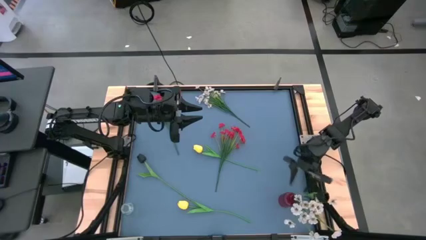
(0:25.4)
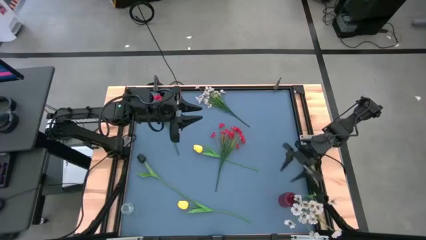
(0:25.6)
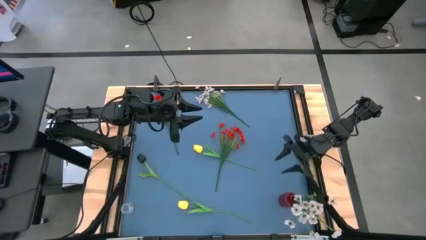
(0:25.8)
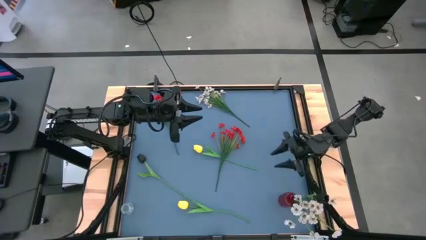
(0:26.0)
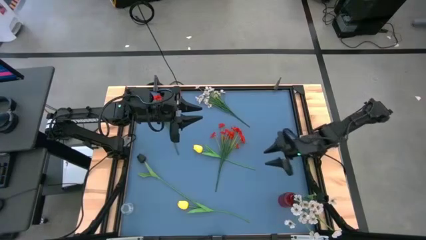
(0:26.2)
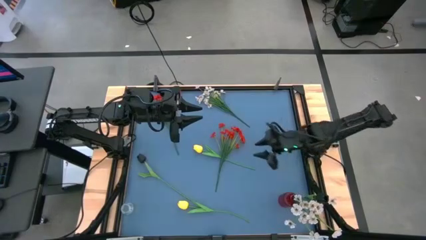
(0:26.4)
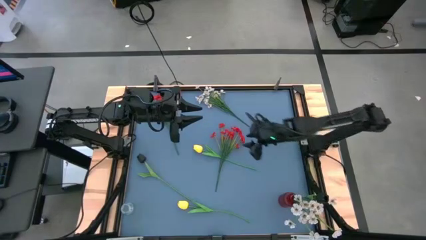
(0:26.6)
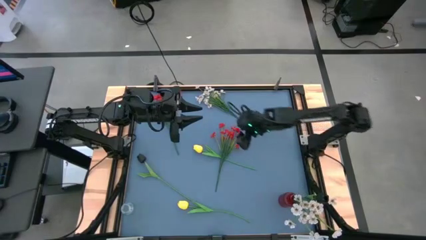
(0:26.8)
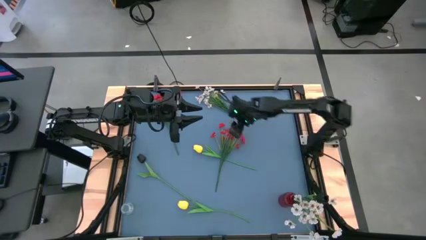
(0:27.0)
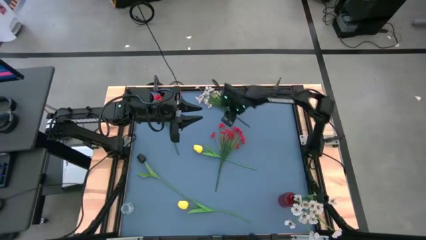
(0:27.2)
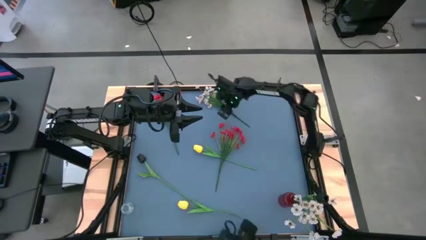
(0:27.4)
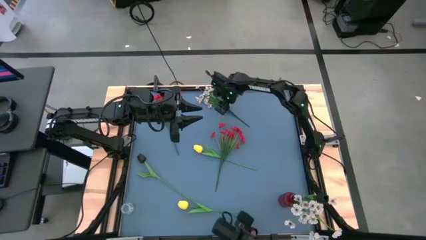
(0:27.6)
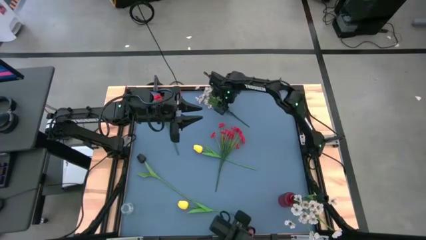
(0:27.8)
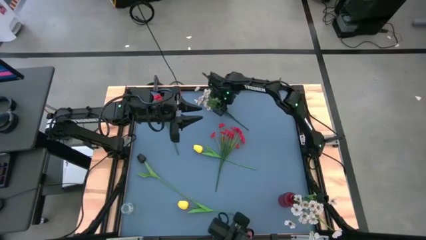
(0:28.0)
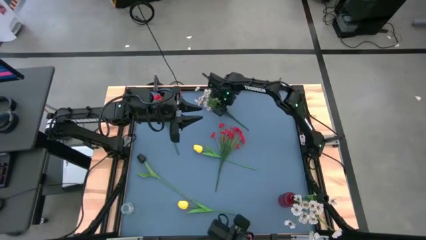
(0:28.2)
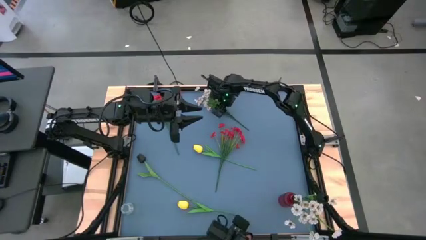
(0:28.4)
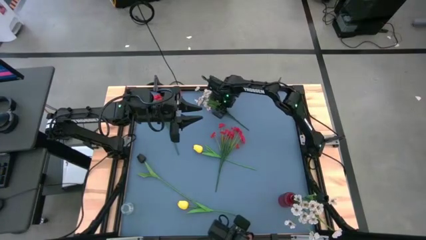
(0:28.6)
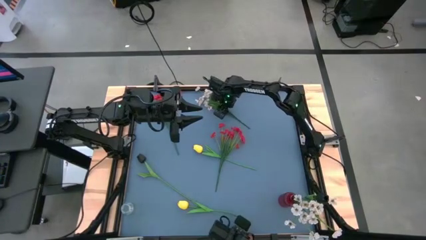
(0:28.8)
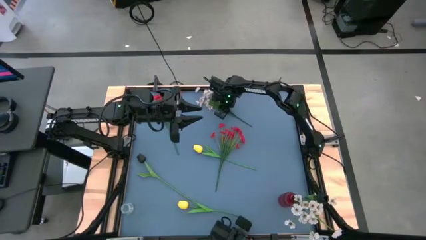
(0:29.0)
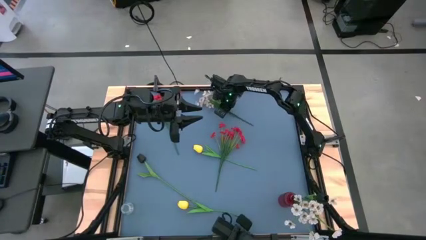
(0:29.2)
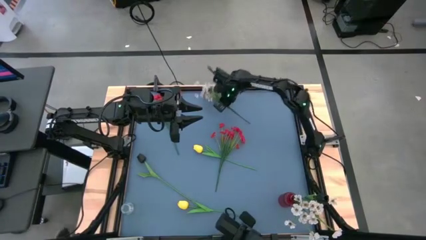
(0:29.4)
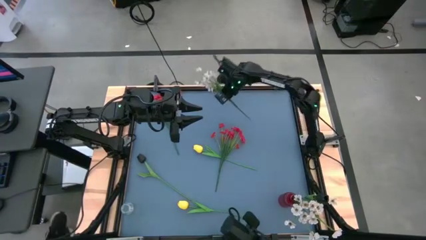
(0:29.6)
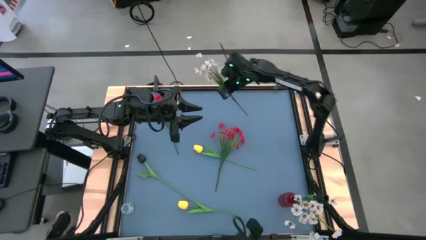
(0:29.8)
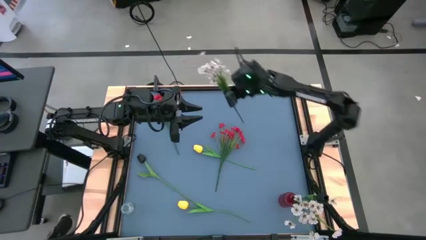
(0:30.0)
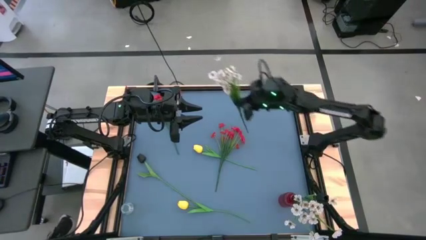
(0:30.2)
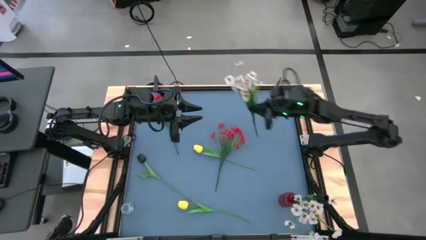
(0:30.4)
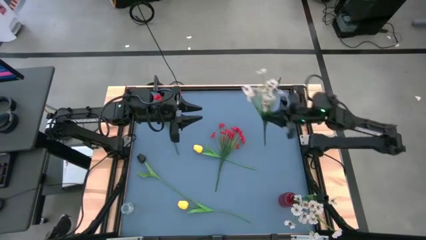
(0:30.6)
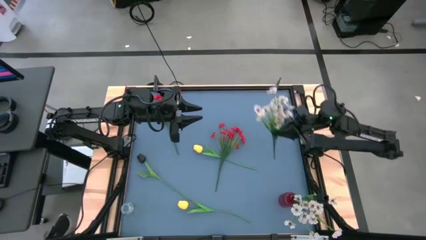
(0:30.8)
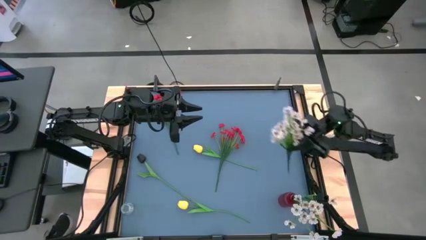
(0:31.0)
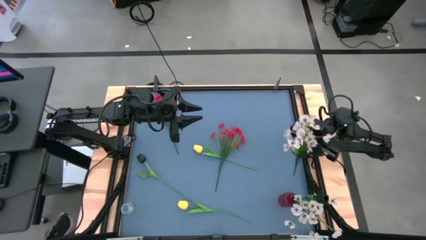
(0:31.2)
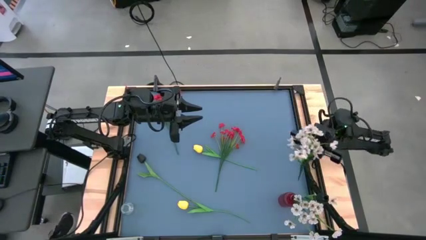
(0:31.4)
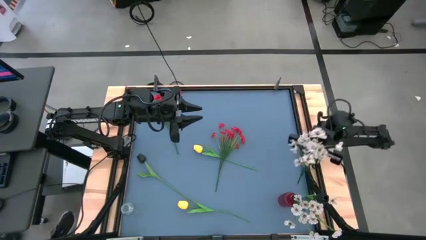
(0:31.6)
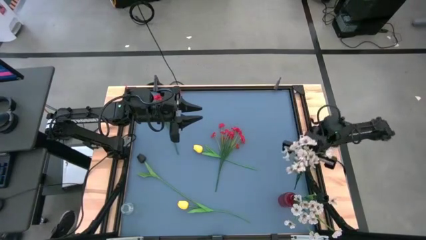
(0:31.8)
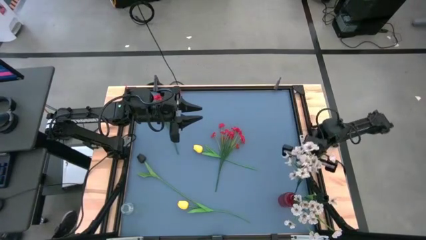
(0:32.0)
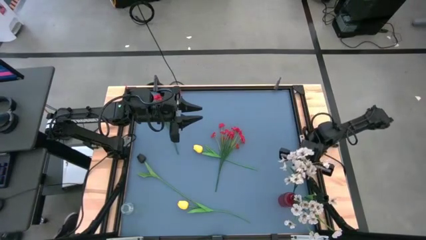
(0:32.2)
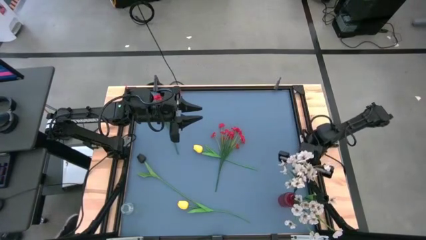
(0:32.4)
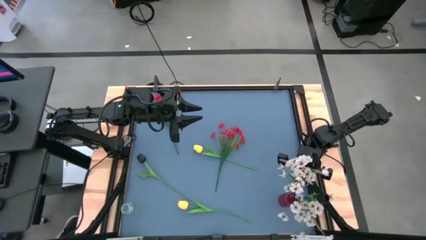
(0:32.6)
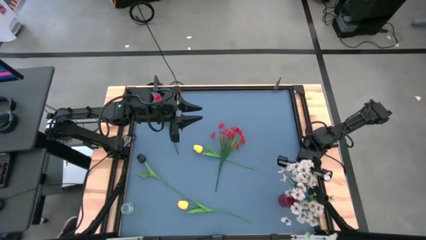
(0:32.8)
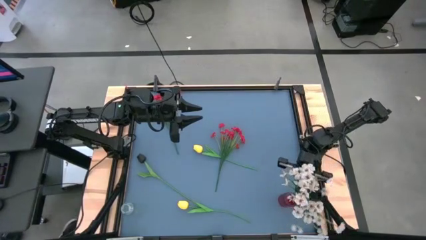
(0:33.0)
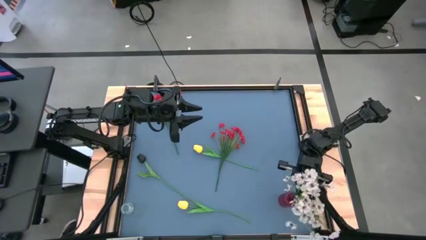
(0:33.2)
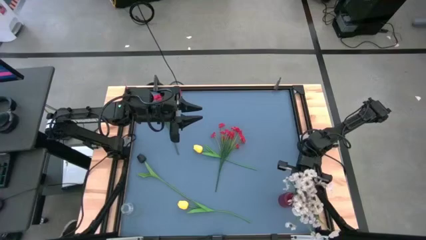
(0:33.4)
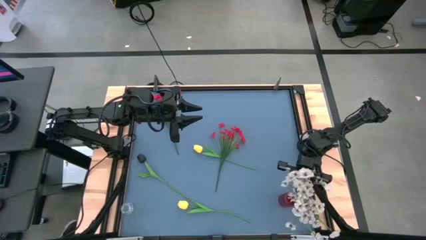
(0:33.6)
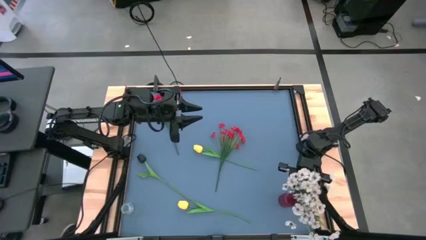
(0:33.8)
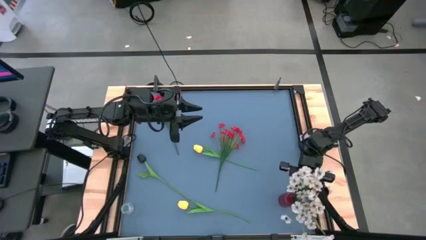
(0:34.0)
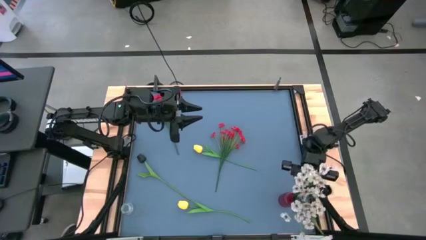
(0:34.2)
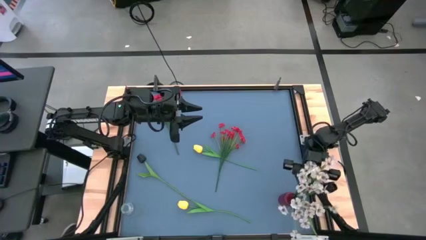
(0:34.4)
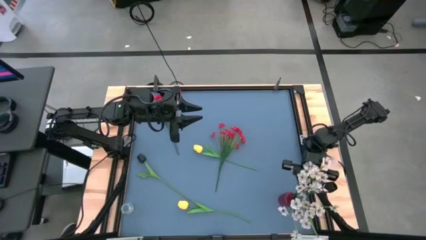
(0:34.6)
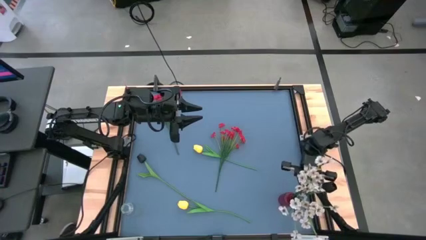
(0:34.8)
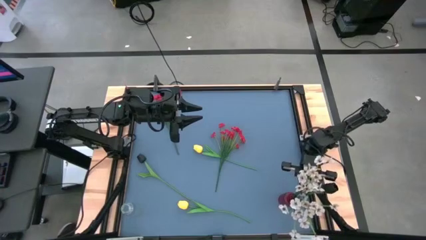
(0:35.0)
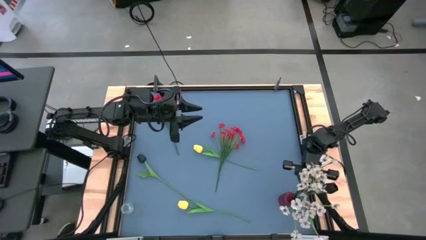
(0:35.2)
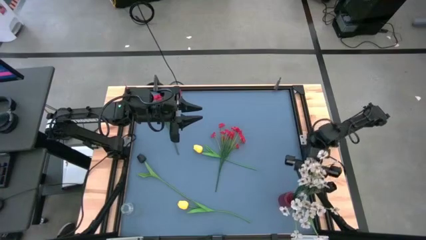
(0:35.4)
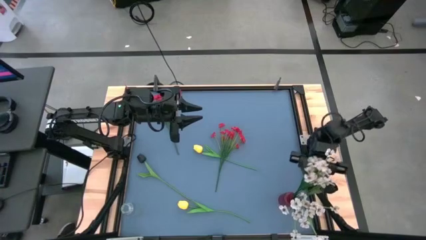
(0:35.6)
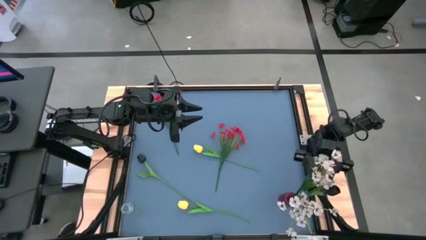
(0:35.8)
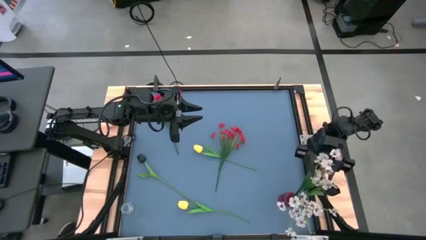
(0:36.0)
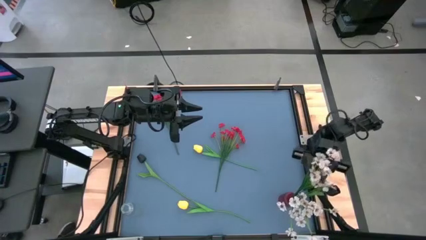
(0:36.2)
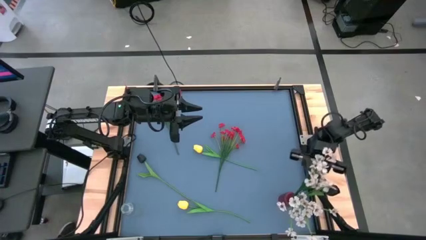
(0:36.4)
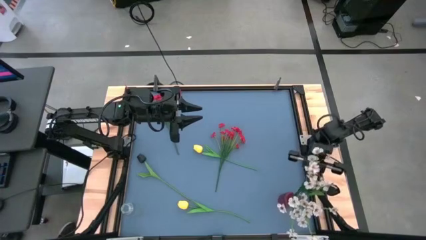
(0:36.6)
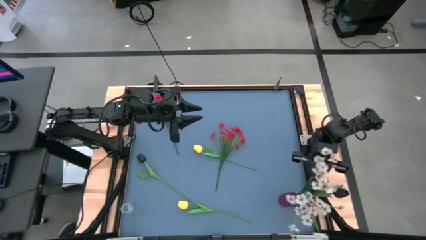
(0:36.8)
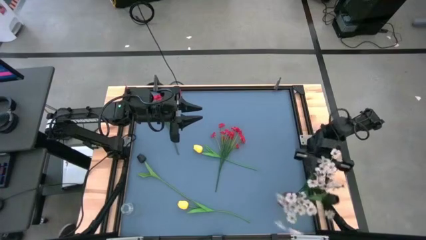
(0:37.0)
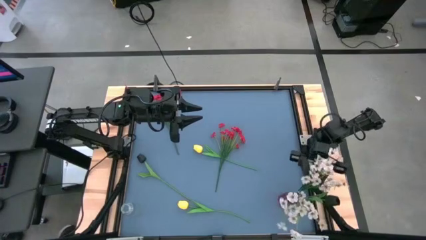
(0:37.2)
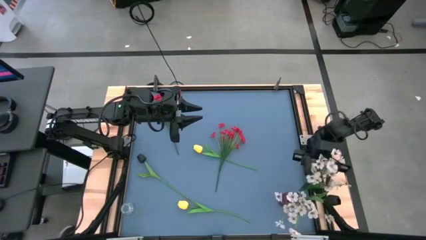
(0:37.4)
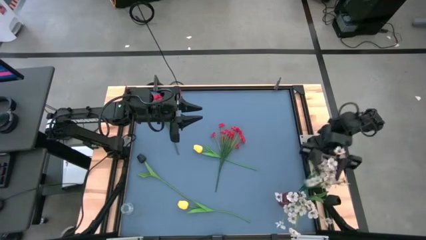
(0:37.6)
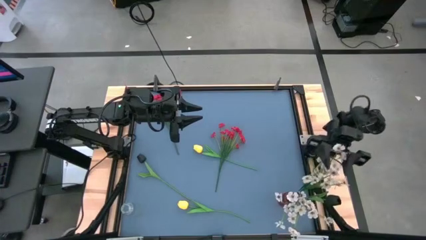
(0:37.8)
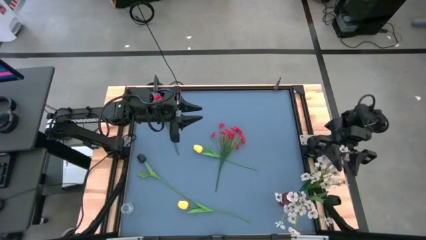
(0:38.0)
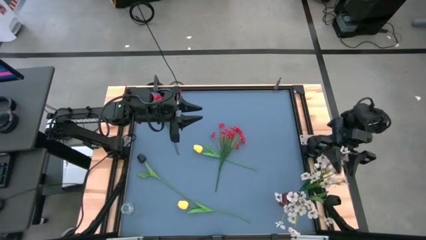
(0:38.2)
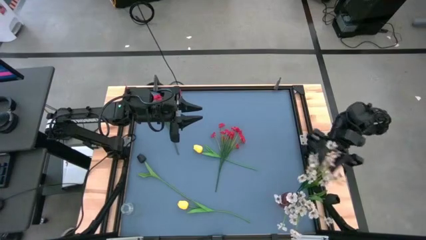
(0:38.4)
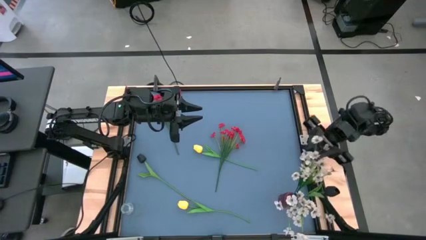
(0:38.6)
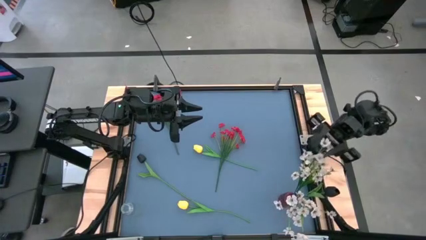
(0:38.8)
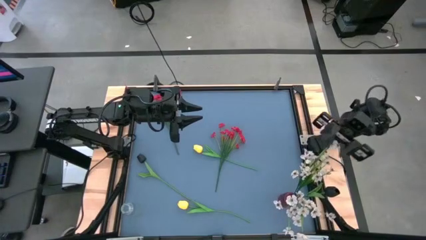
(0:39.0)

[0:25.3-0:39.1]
Task: Sort flowers into vase by color
Put the white flowers into the red vase
